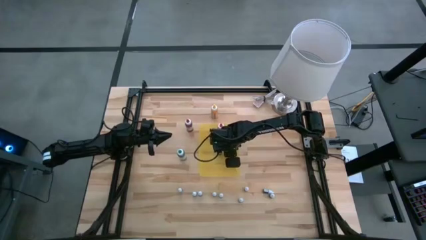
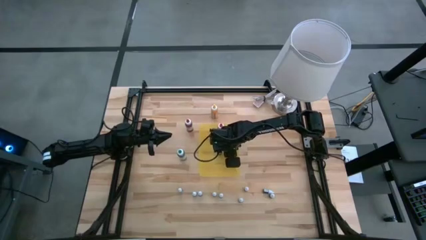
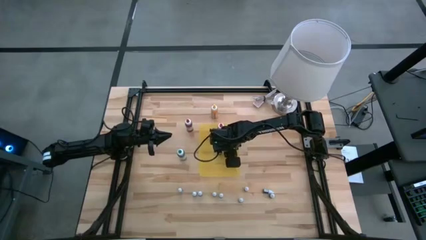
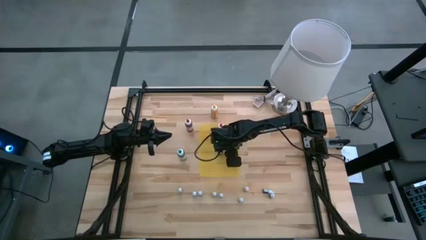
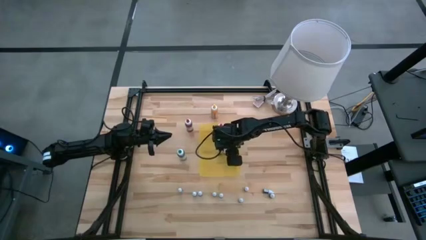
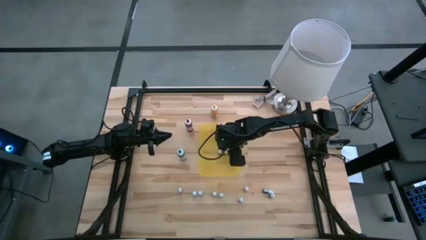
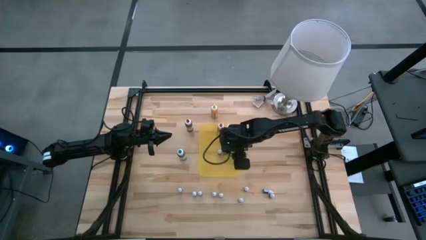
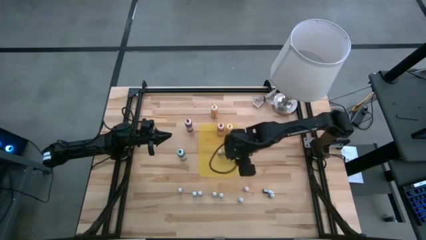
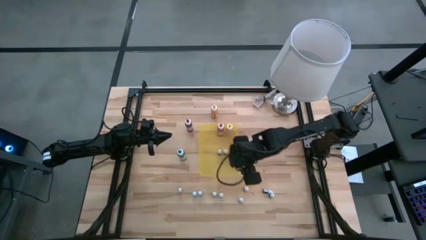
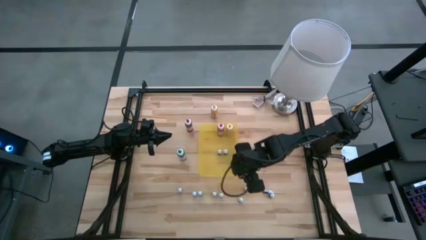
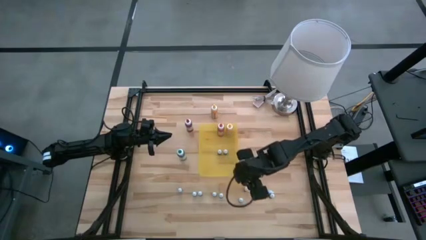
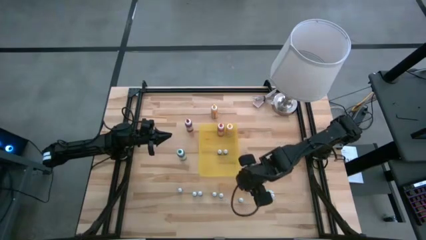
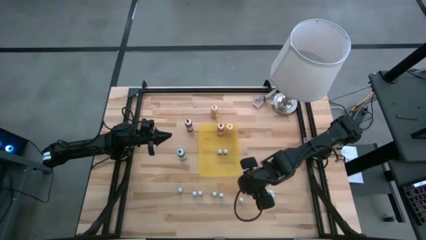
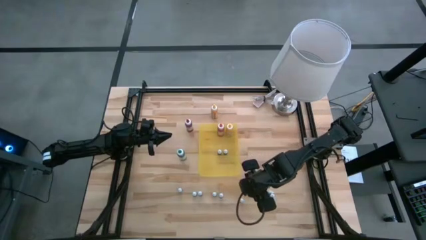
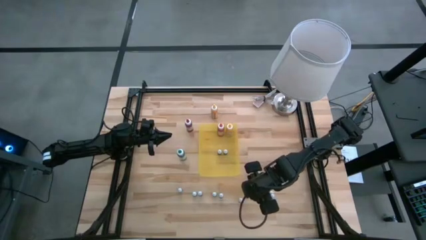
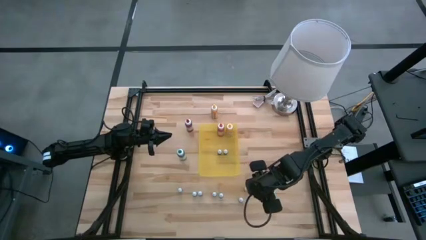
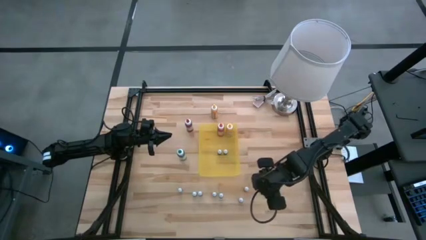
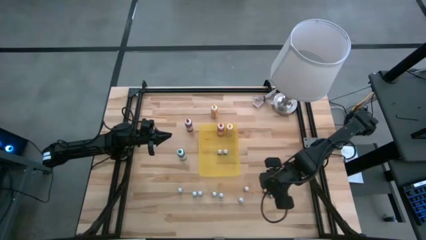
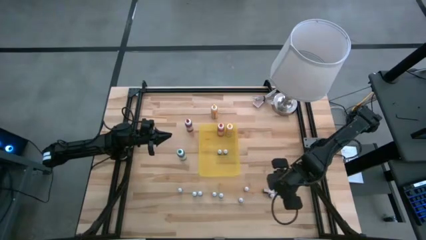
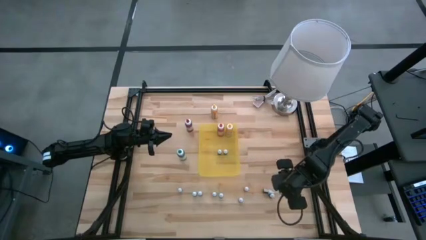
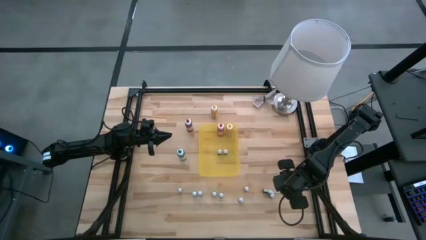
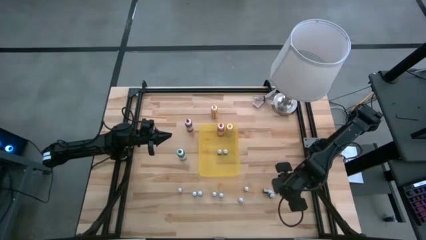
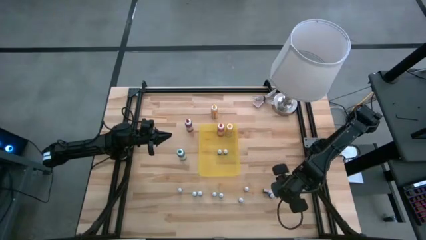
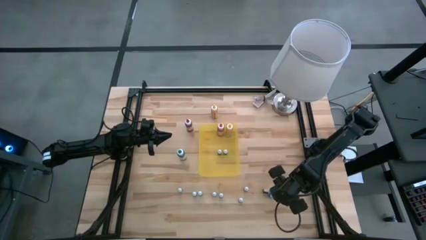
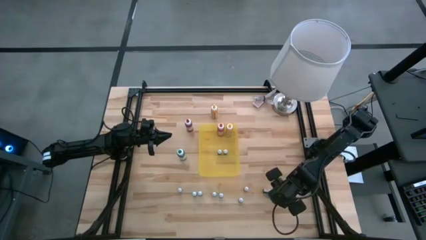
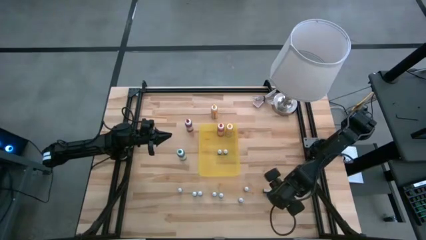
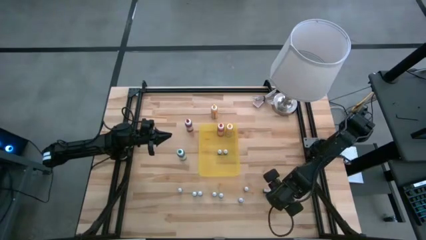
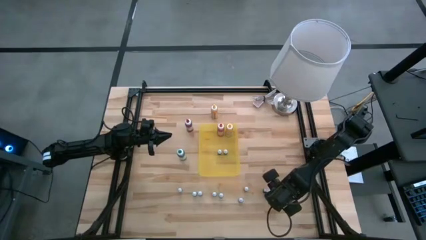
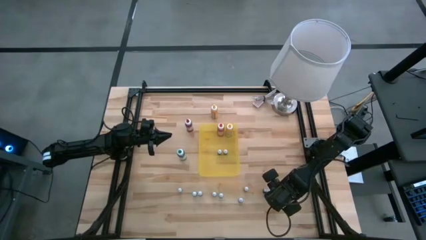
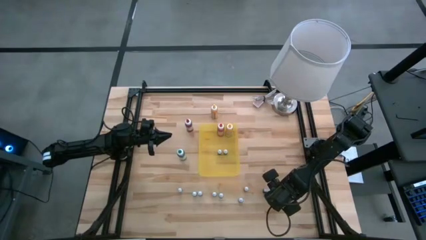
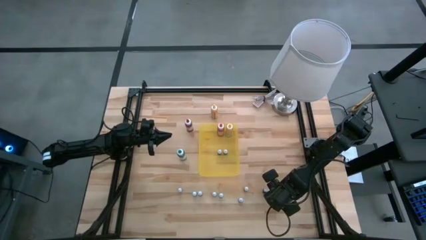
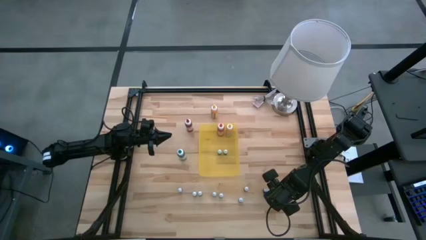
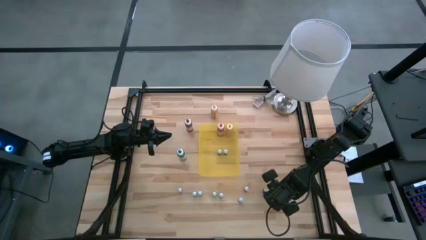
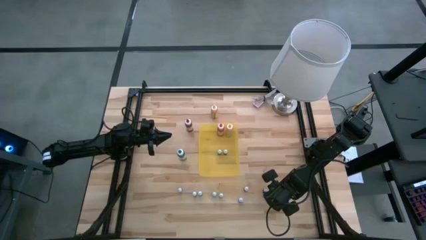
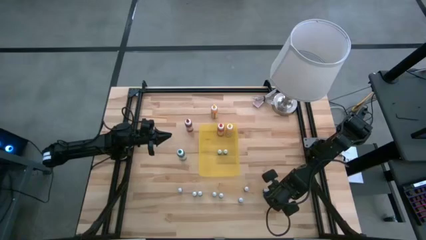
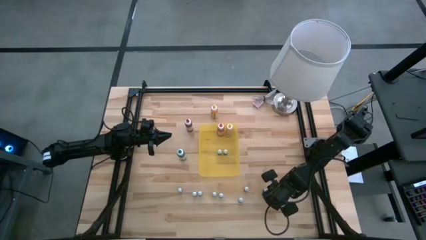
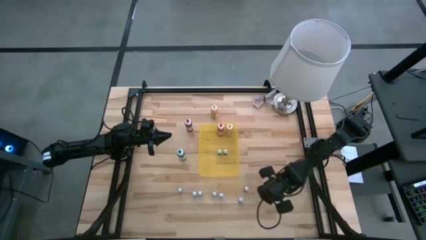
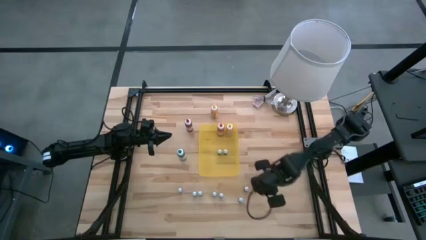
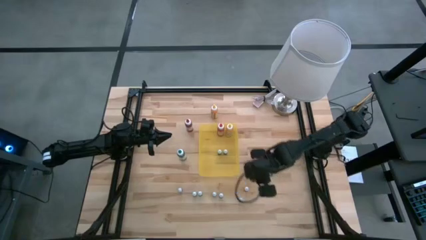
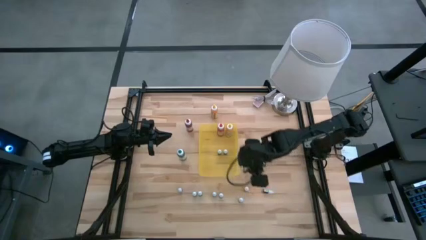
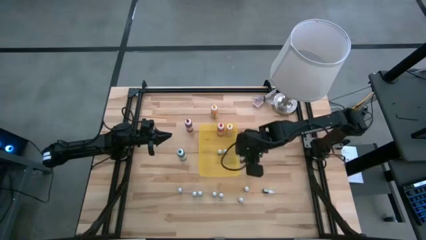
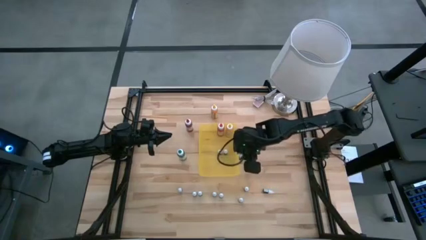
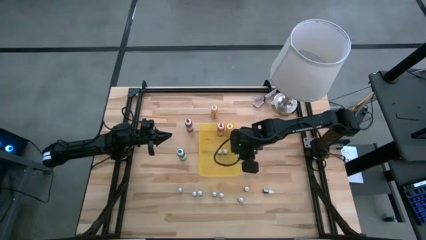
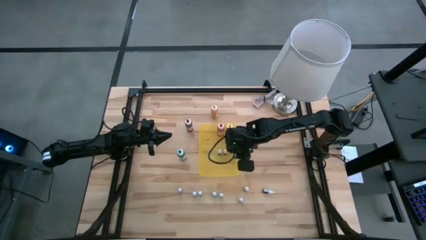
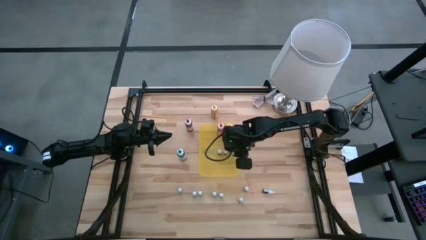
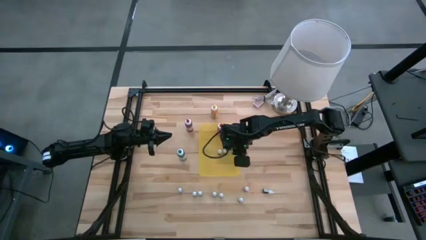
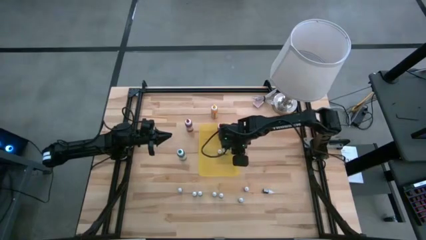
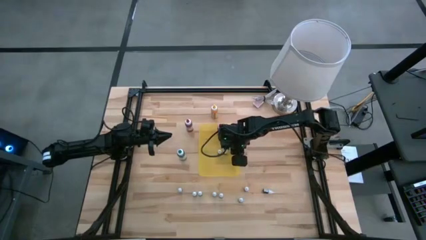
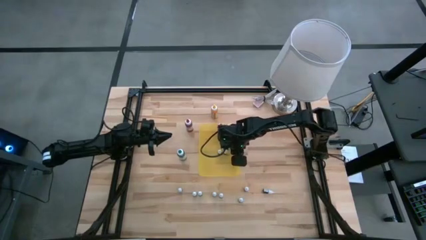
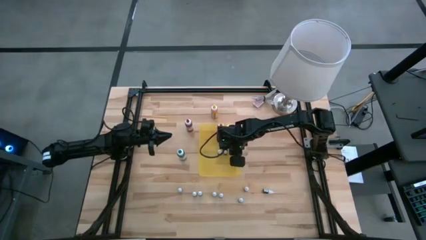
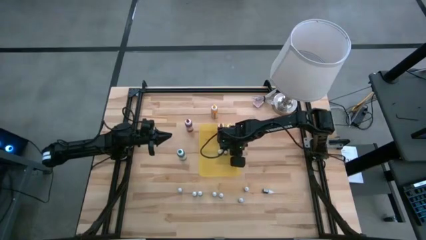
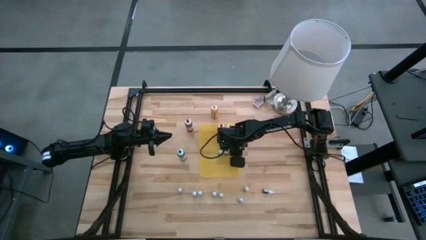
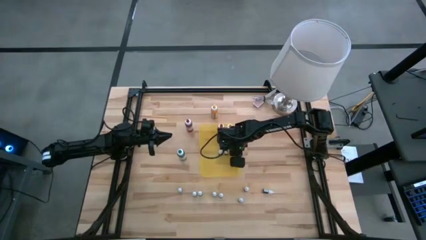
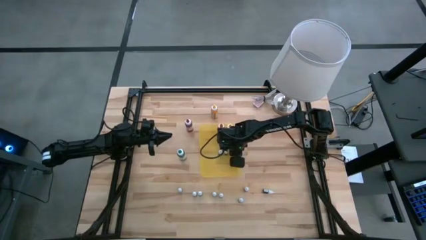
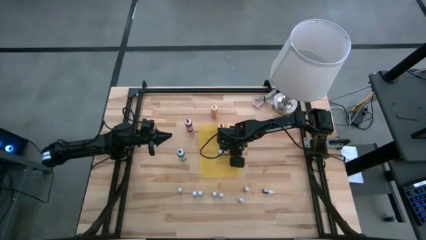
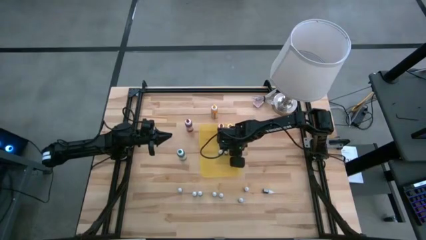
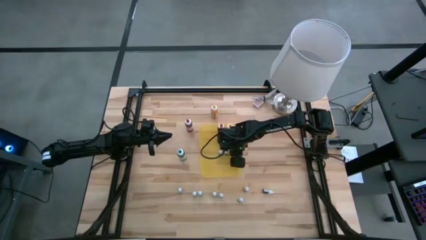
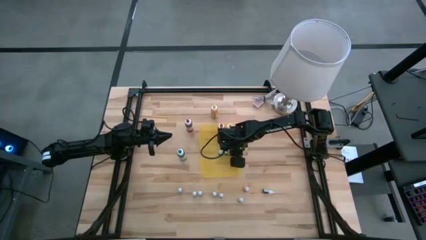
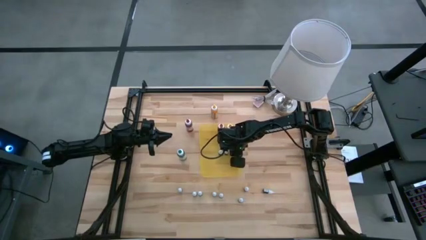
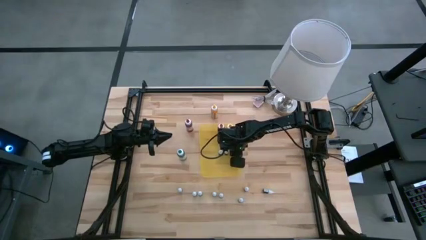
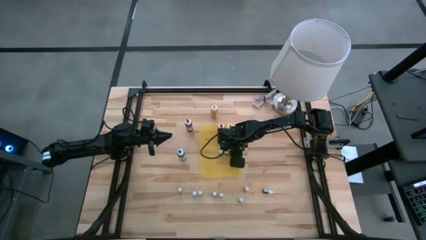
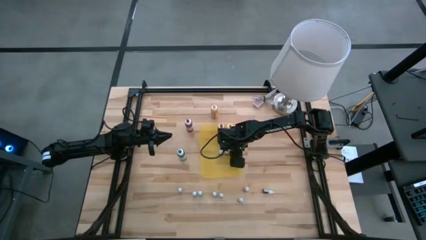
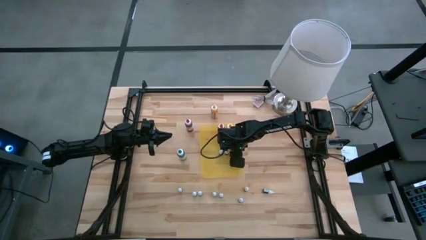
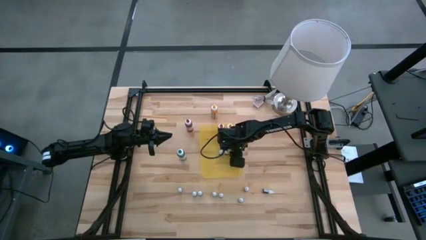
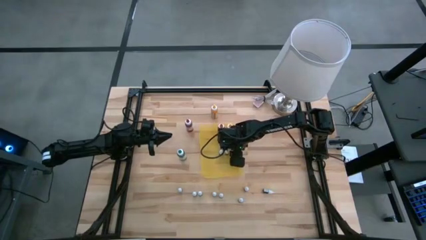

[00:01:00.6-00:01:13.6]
Task: Pick & Place food coloring
Put the right small black food coloring bottle into the bin

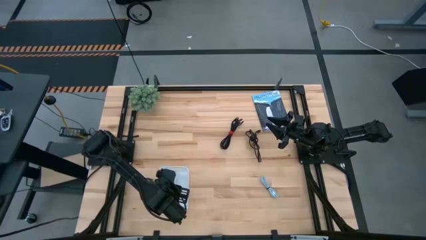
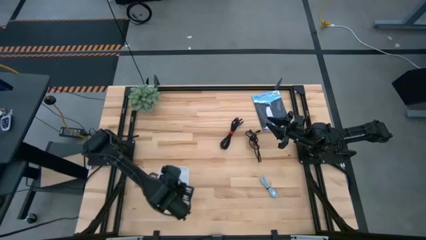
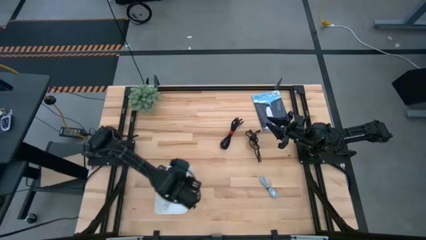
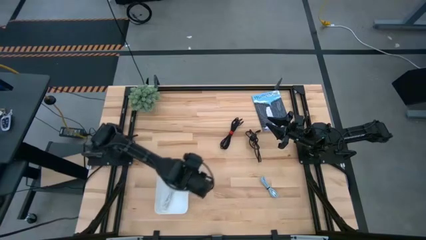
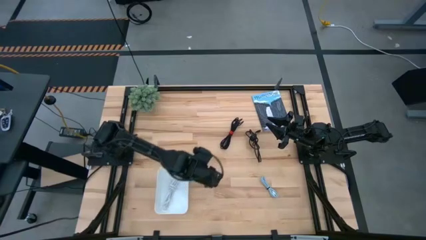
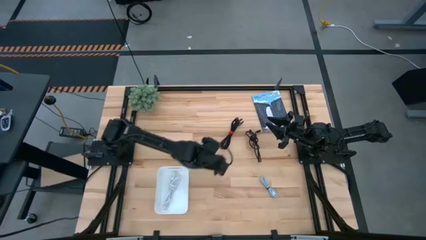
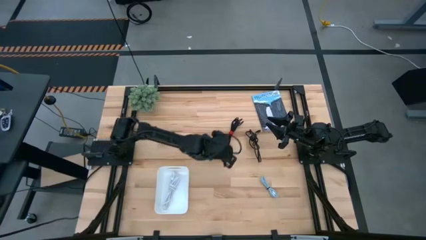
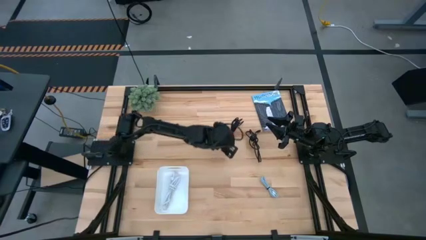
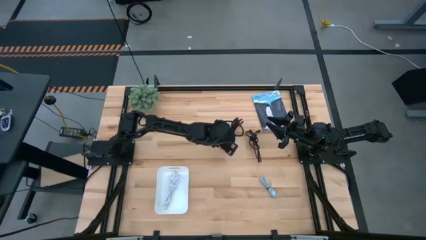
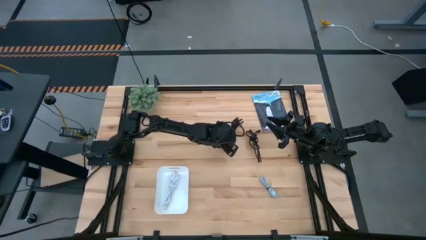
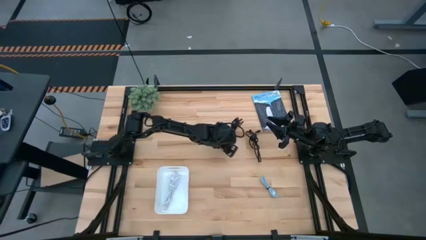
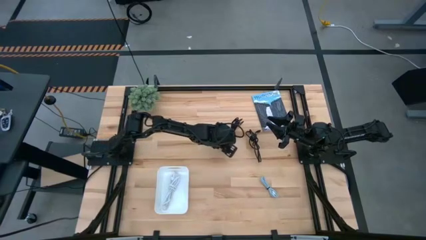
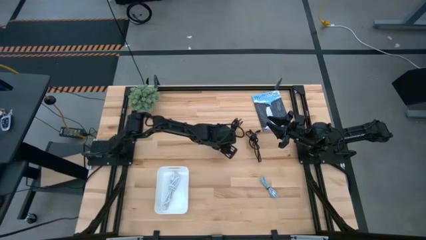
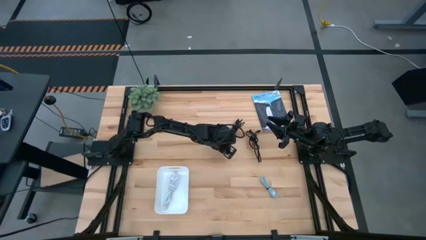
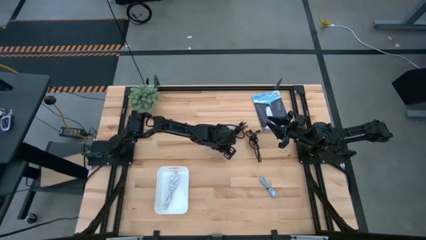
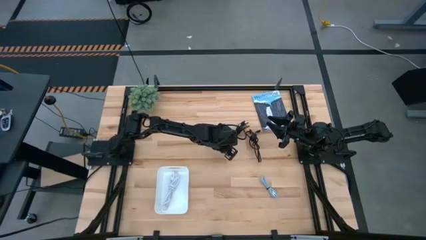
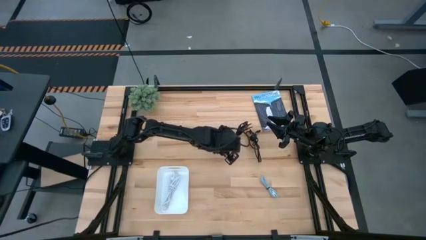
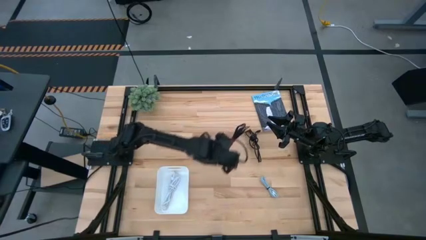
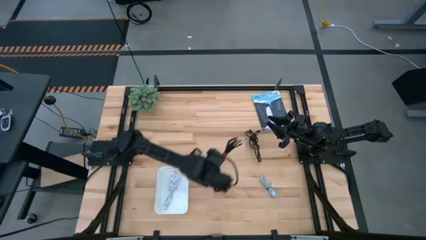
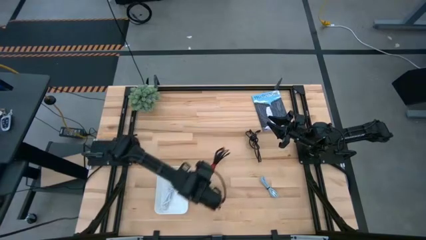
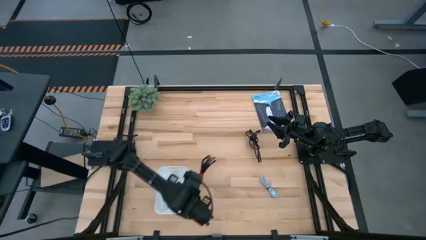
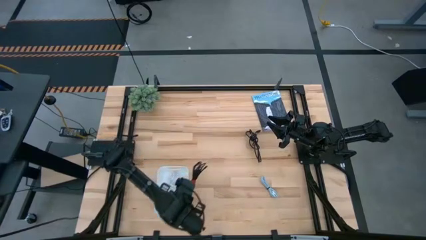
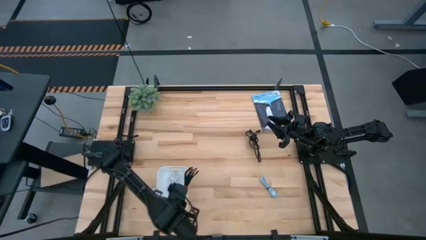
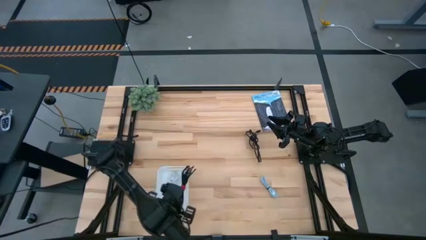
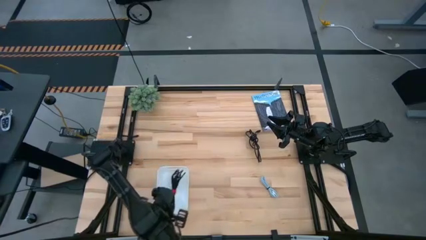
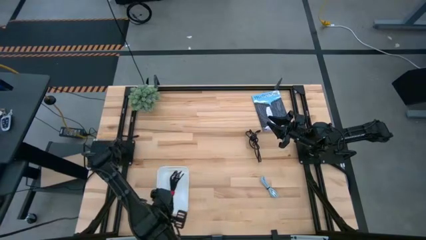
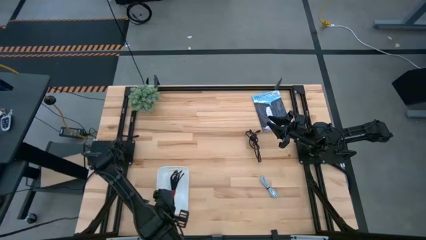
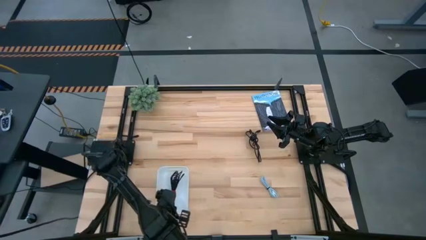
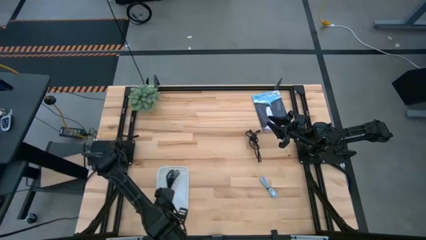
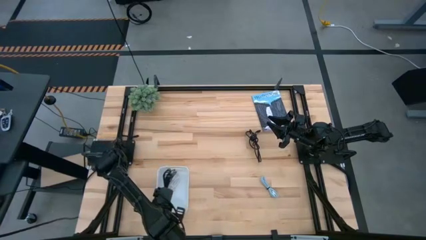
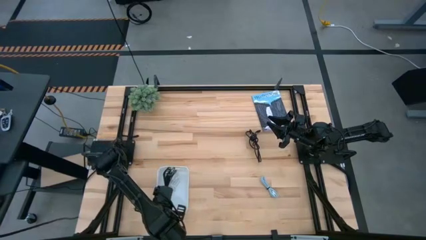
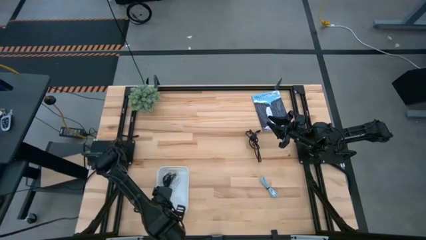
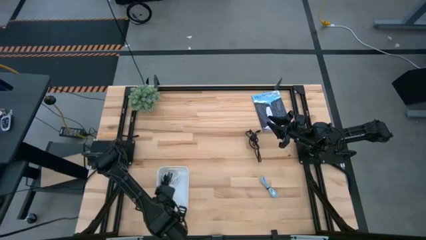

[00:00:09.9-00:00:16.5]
Task: Pick and place USB-C Cables
Put the left black charger cable into the white bin
